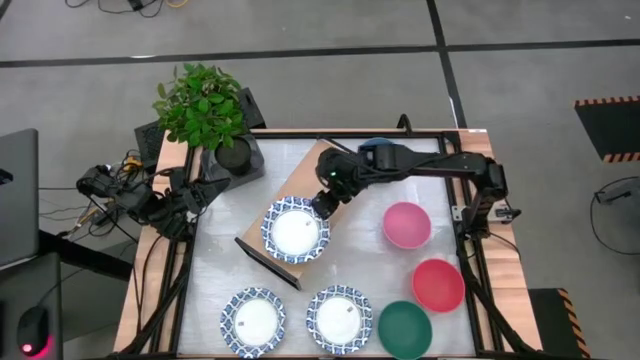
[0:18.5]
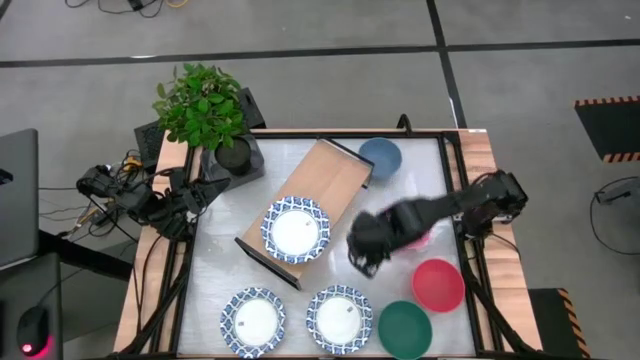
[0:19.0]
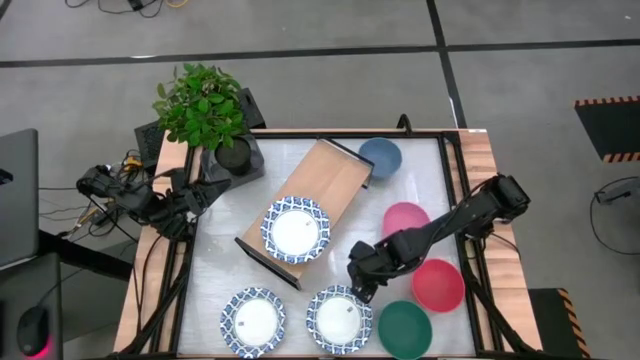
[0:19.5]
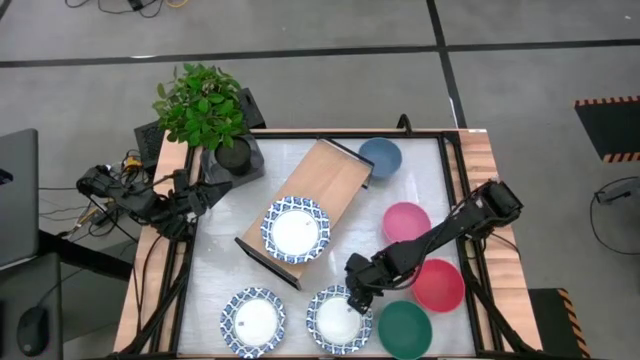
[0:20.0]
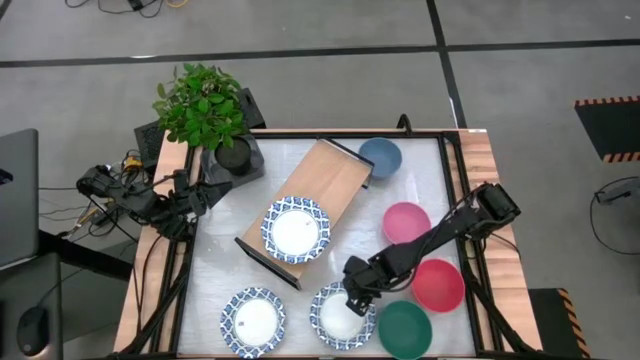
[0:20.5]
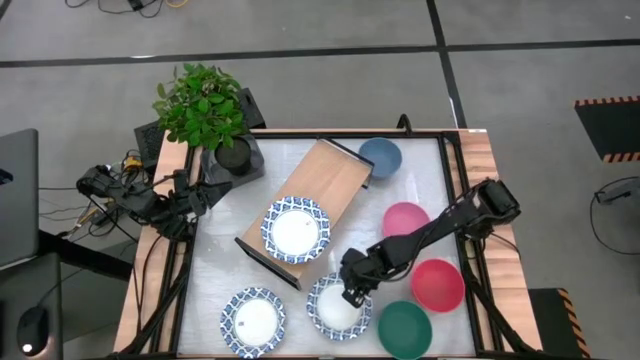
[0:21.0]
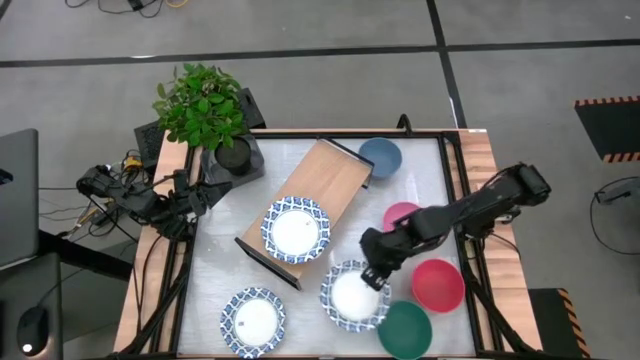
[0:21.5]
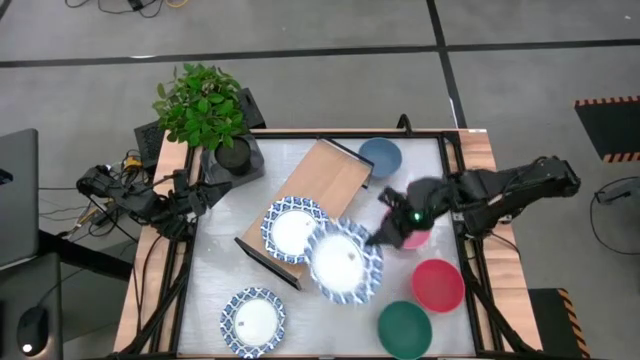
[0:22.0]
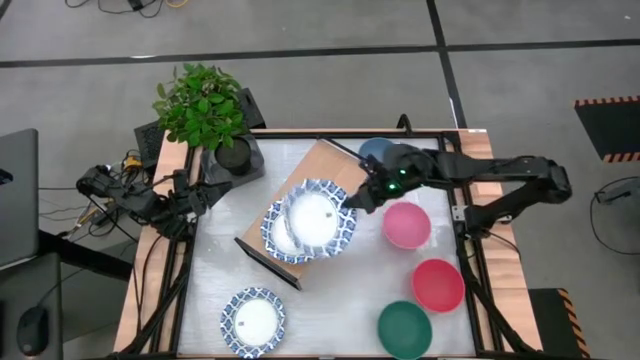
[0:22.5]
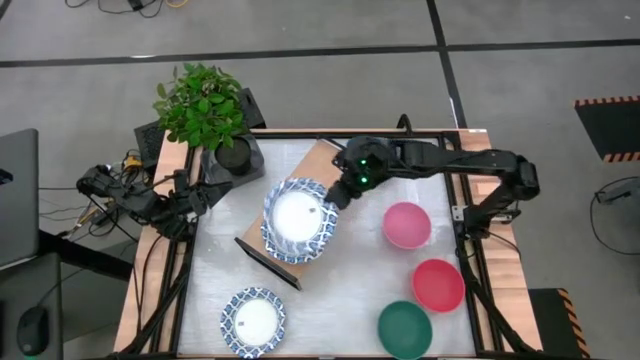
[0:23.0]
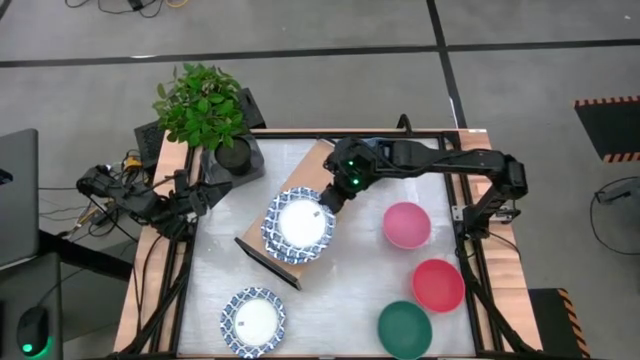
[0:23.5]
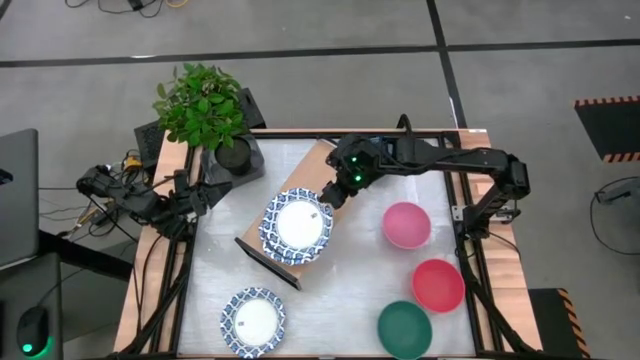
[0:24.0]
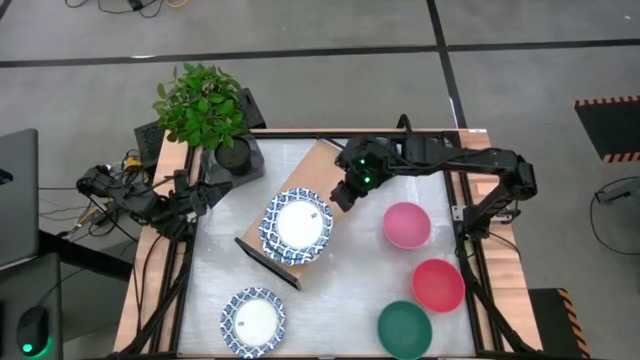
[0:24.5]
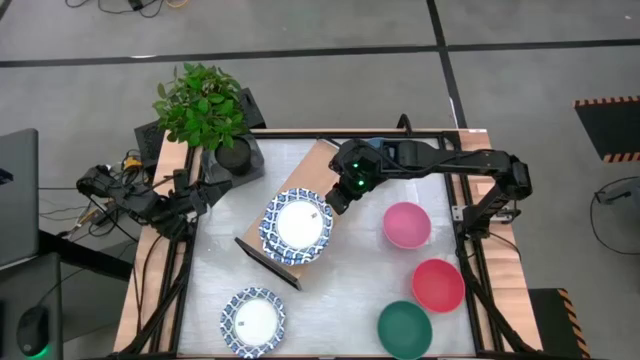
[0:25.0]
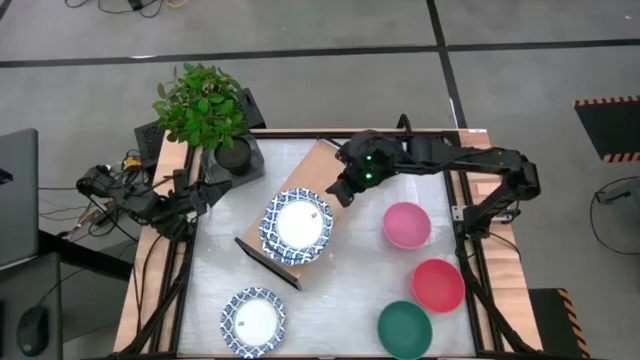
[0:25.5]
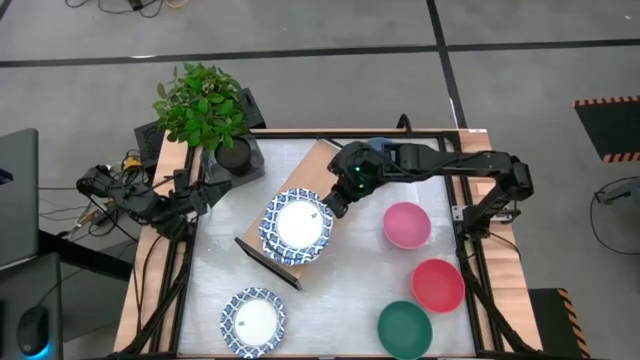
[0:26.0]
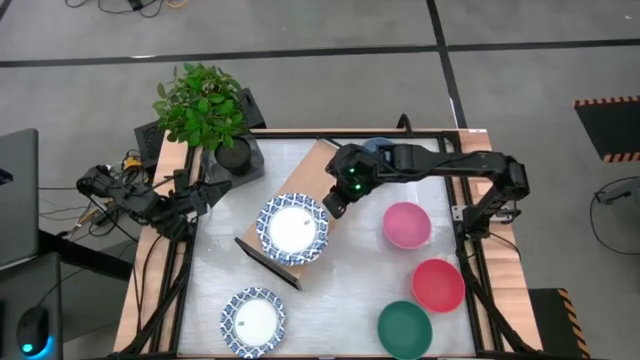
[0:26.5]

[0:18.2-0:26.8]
Task: Place and stack bowls onto a shelf
Stack the right white patterned bowl on the white patterned bowl on the shelf

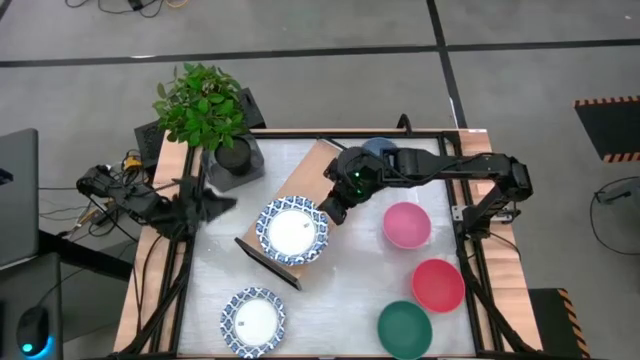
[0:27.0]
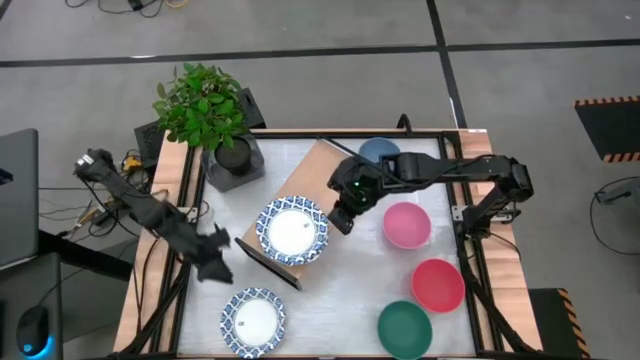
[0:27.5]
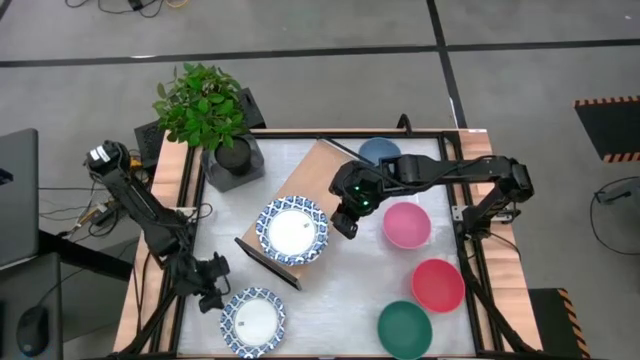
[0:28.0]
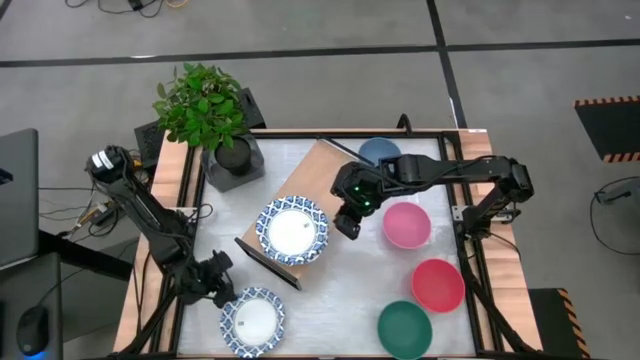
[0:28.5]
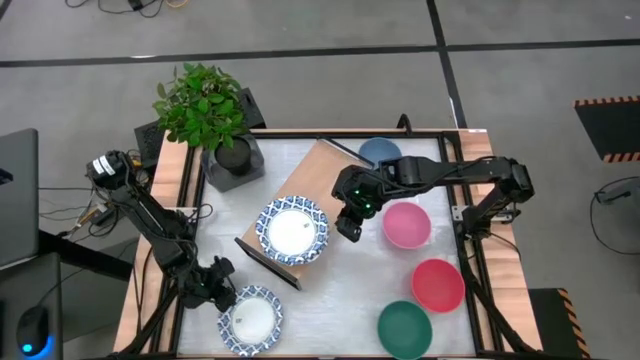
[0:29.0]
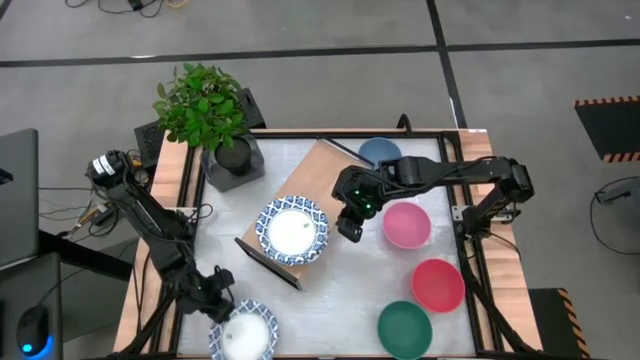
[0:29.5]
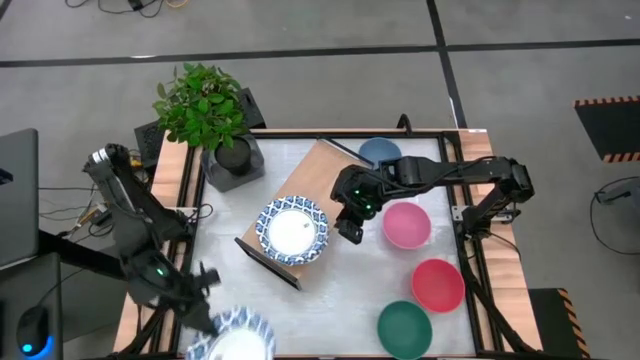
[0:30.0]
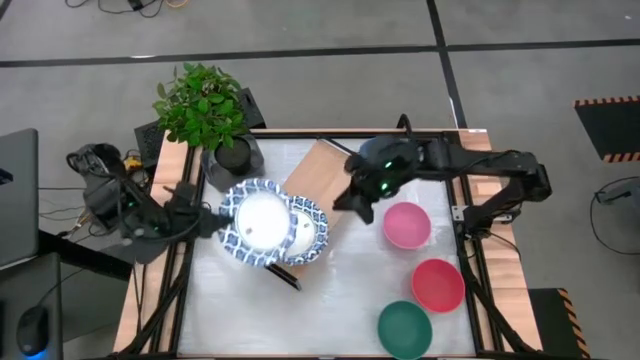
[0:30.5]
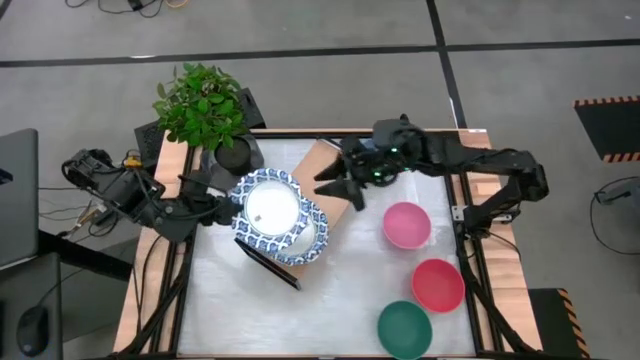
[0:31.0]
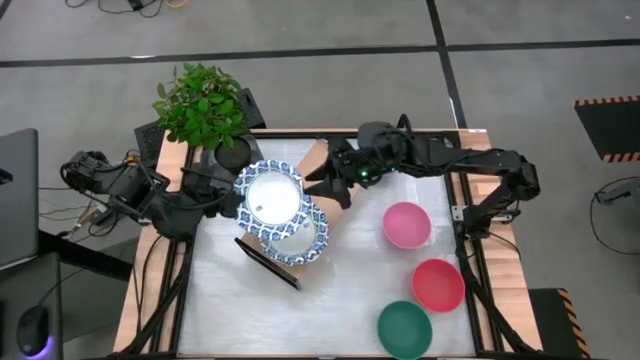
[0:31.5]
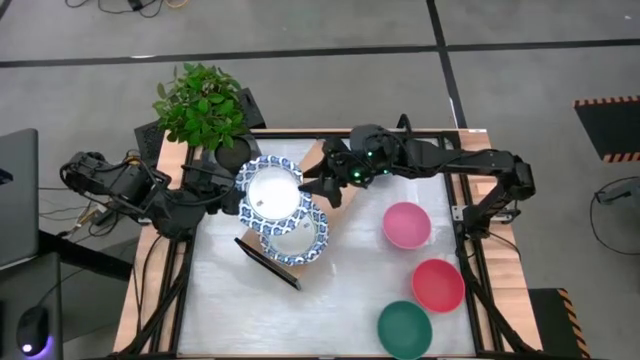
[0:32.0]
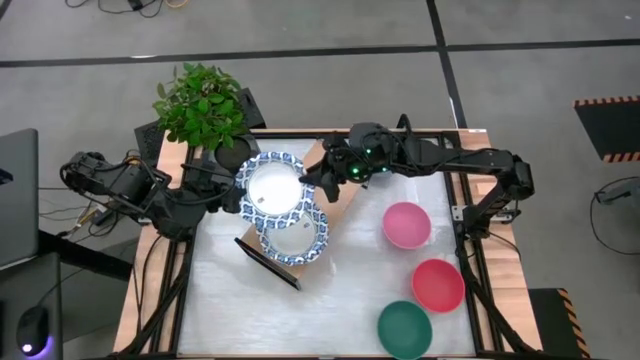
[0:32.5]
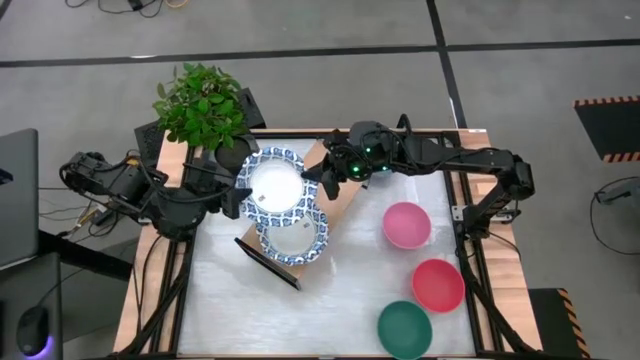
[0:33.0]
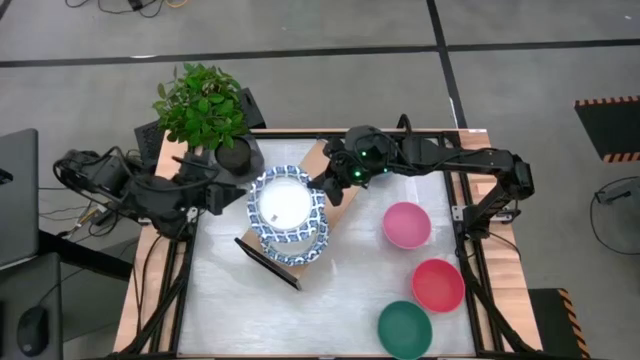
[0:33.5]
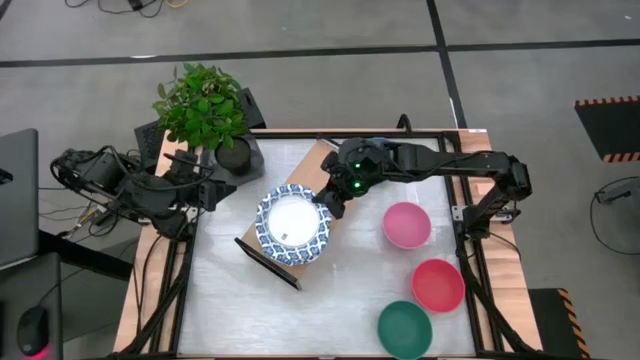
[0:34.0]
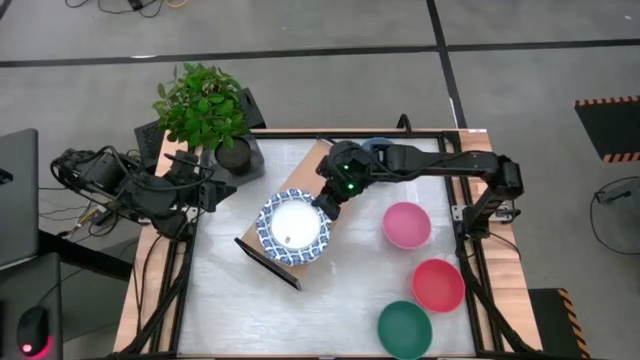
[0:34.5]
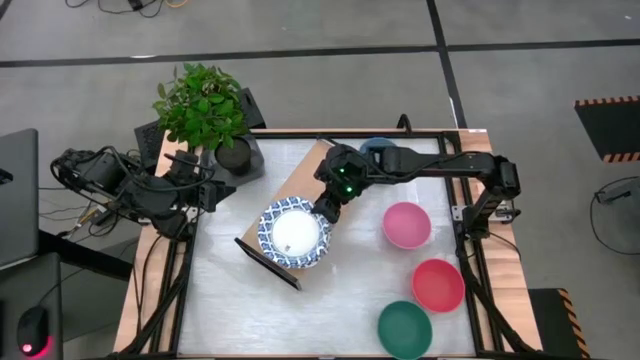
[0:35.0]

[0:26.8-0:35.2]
Stack the white patterned bowl on the white patterned bowl on the shelf

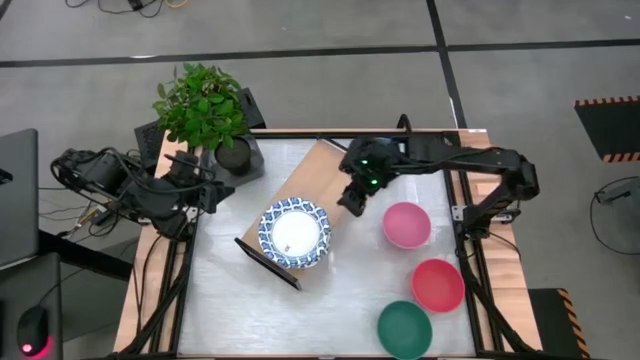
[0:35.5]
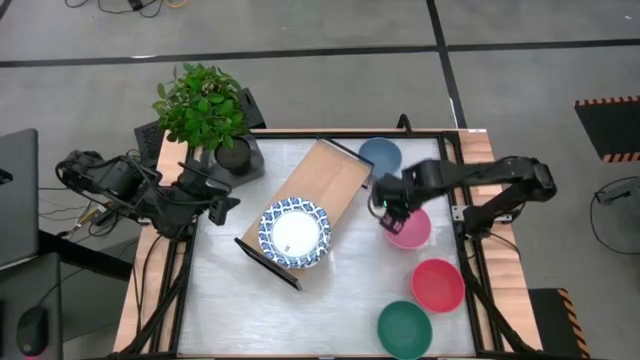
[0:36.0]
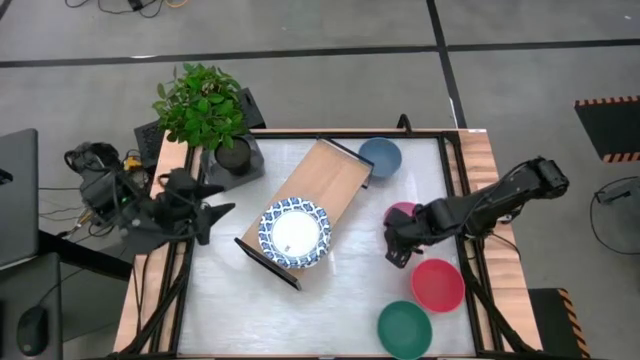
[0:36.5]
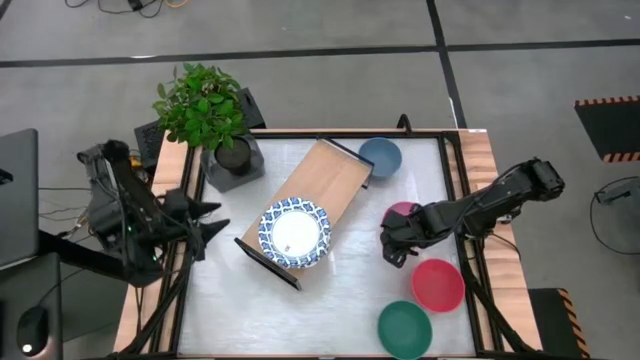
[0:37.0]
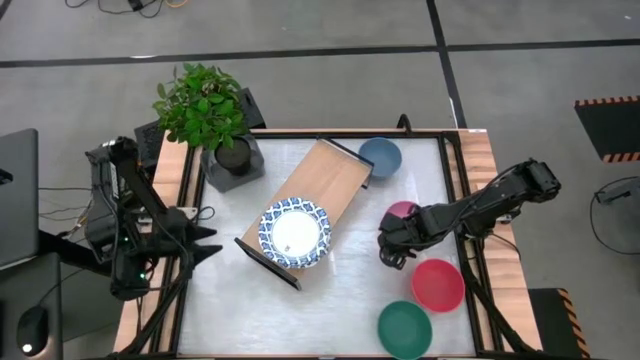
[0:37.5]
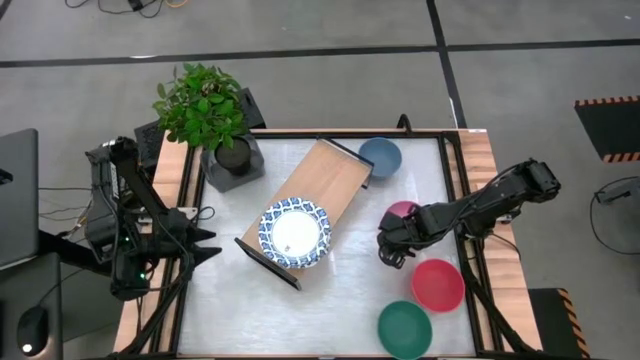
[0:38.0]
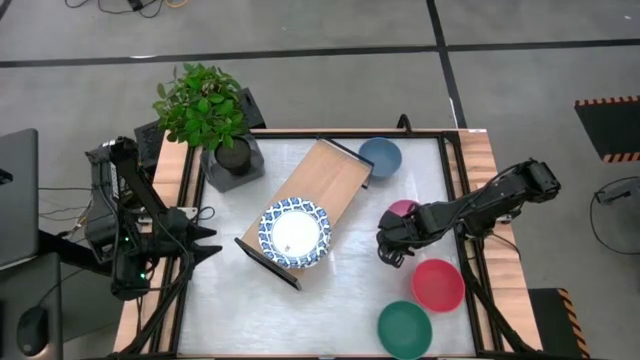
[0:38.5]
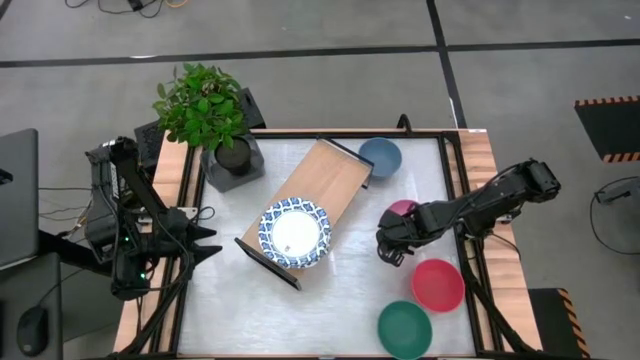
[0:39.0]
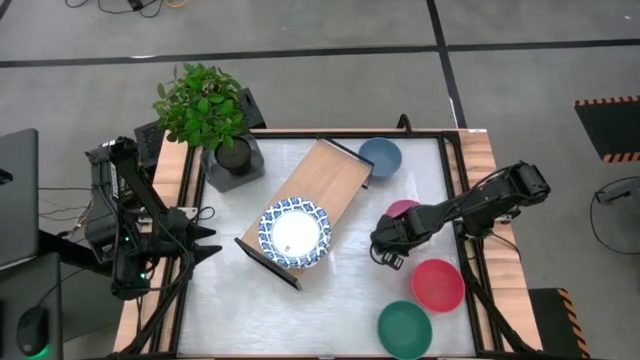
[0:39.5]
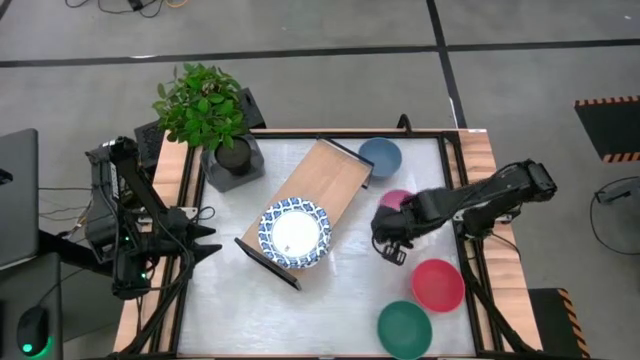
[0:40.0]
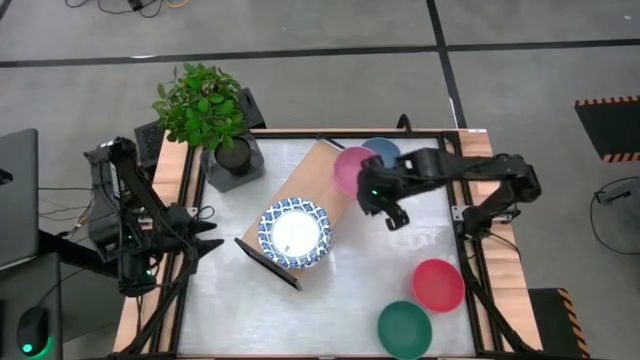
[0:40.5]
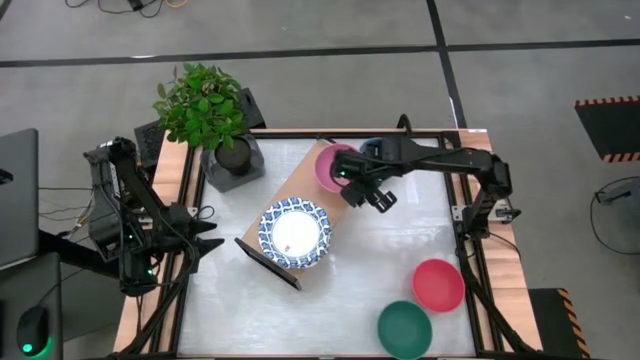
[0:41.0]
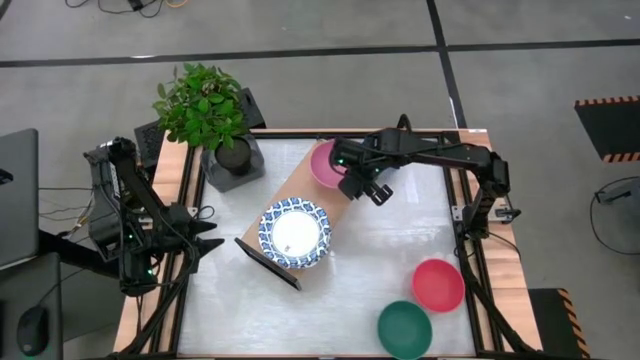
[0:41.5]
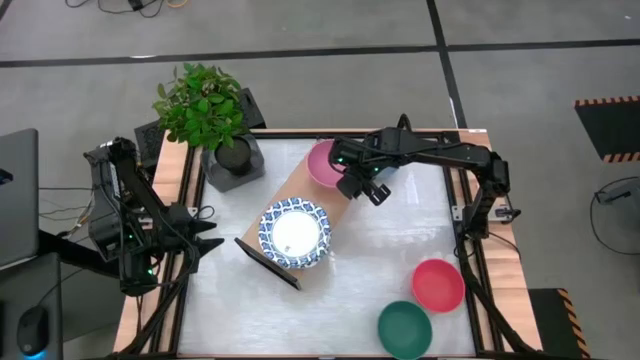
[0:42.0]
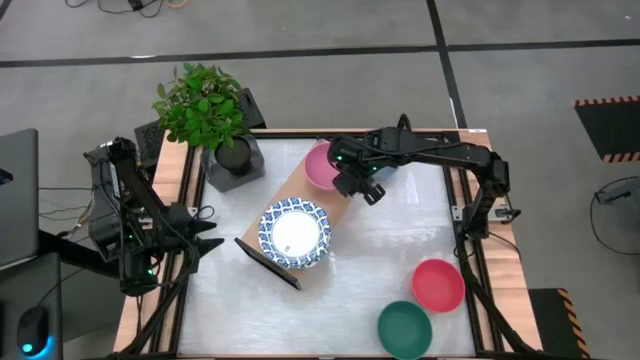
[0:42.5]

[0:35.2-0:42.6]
Put the pink bowl on the shelf
